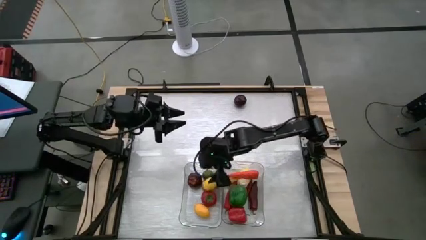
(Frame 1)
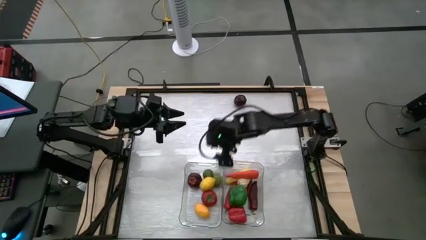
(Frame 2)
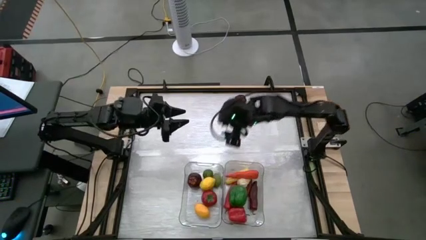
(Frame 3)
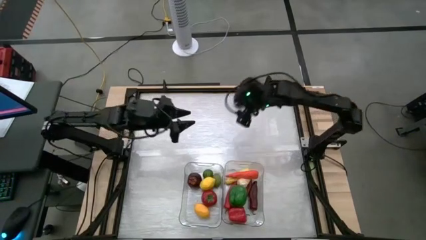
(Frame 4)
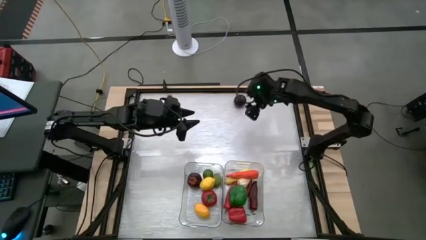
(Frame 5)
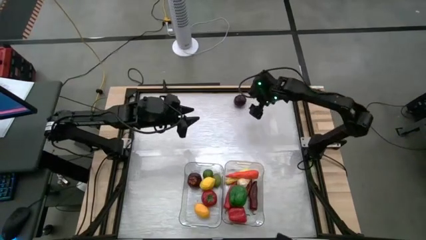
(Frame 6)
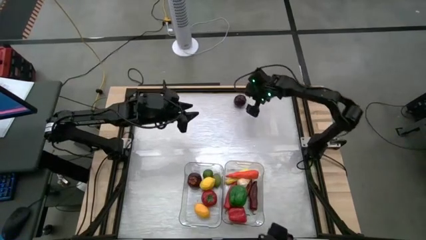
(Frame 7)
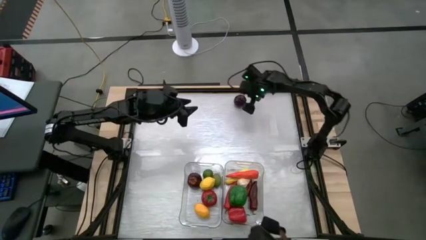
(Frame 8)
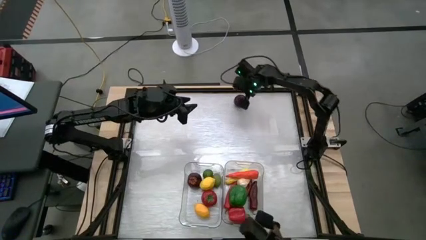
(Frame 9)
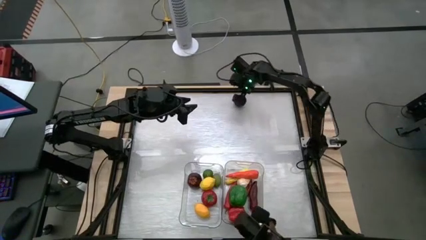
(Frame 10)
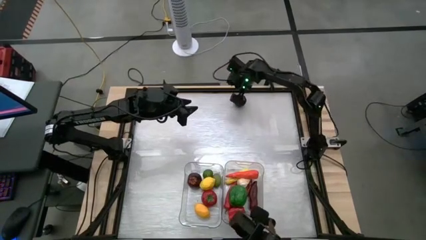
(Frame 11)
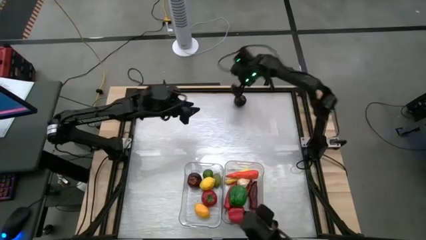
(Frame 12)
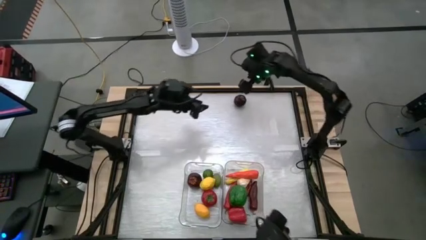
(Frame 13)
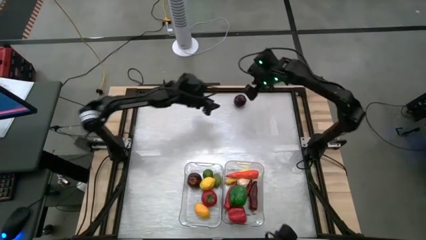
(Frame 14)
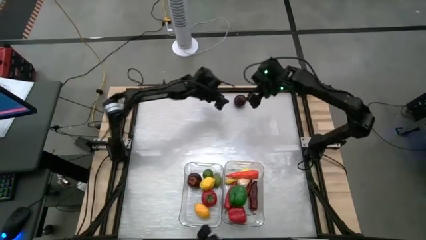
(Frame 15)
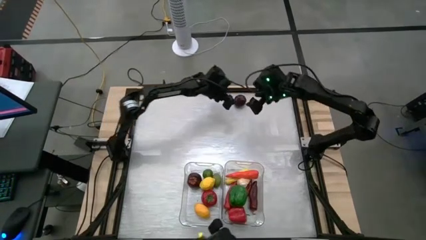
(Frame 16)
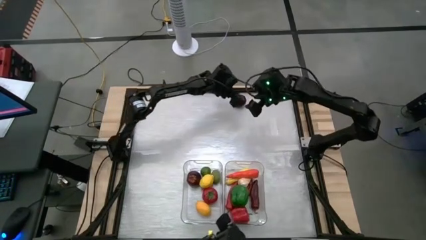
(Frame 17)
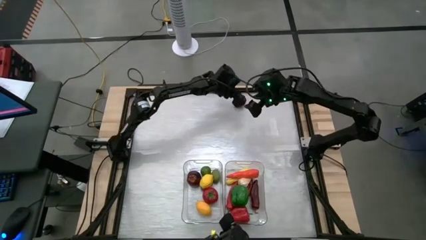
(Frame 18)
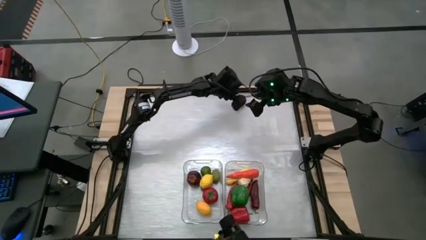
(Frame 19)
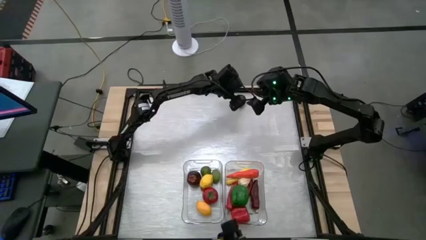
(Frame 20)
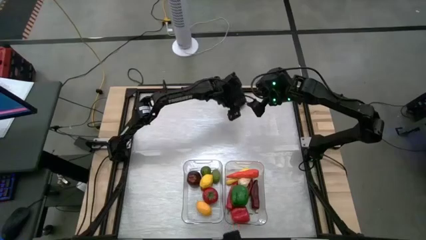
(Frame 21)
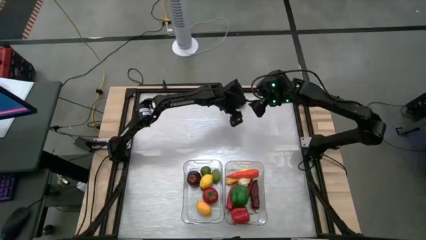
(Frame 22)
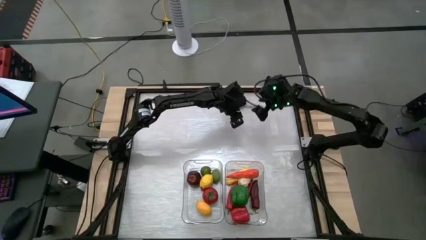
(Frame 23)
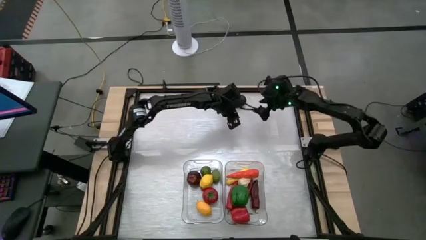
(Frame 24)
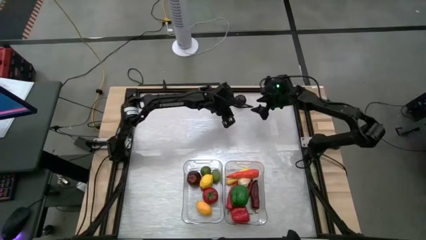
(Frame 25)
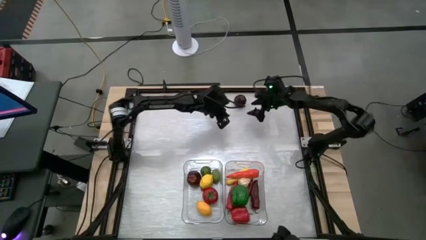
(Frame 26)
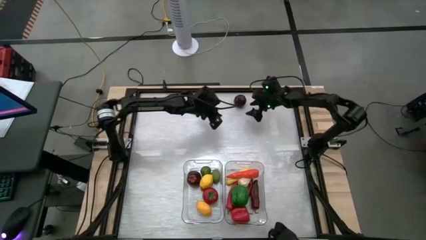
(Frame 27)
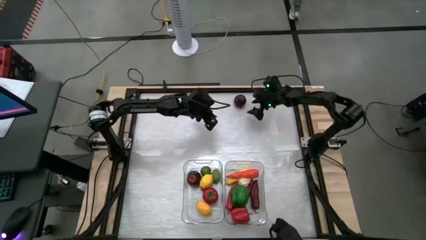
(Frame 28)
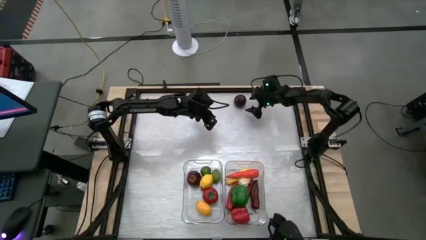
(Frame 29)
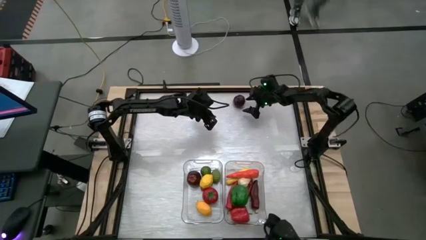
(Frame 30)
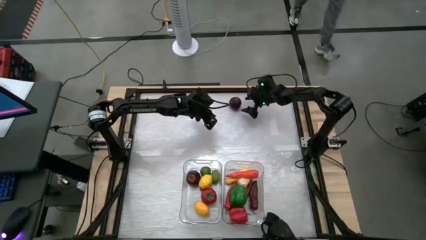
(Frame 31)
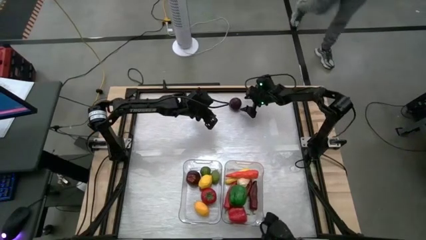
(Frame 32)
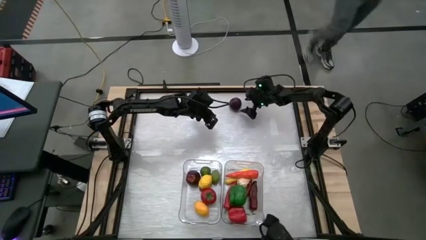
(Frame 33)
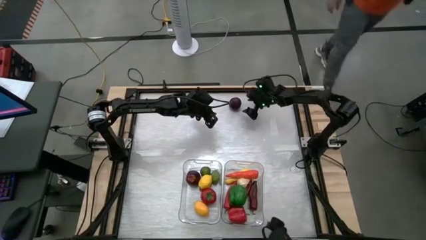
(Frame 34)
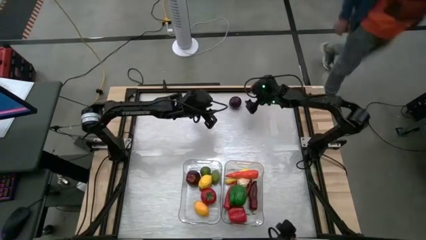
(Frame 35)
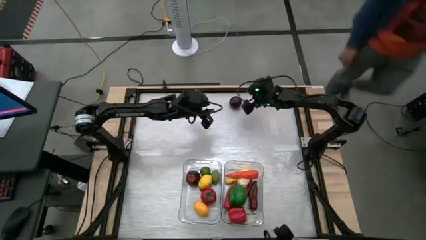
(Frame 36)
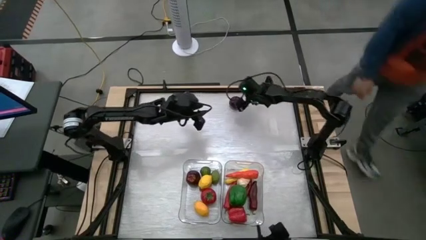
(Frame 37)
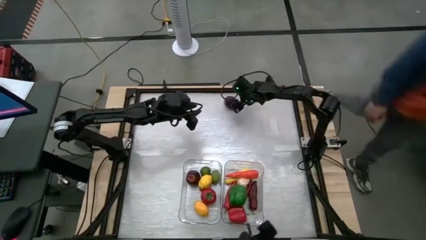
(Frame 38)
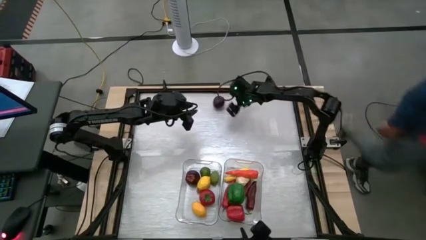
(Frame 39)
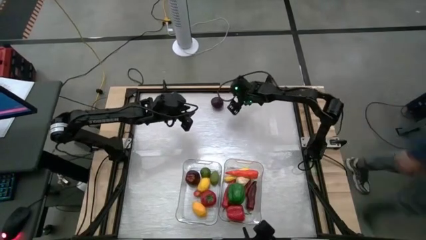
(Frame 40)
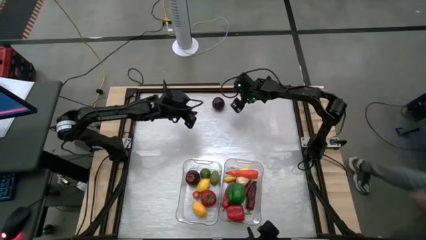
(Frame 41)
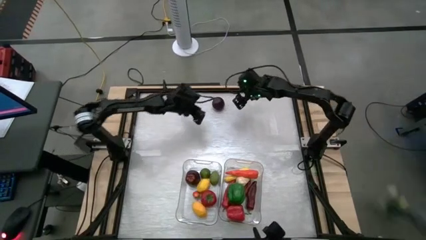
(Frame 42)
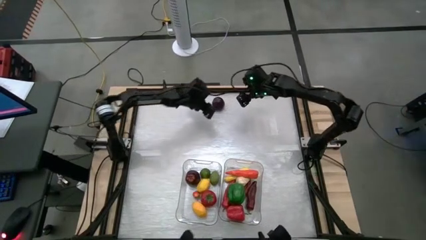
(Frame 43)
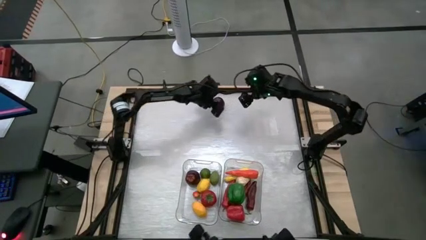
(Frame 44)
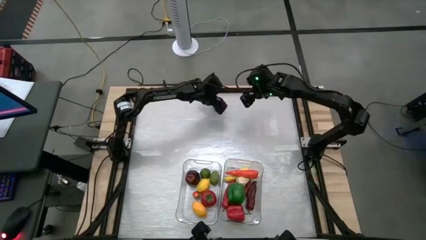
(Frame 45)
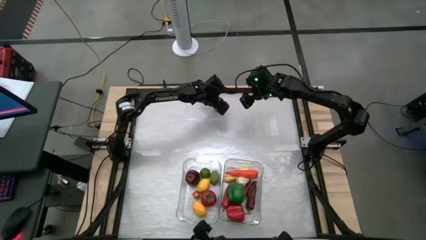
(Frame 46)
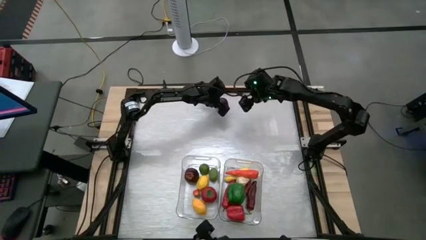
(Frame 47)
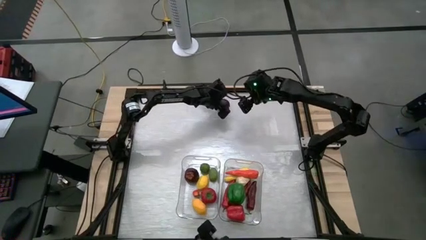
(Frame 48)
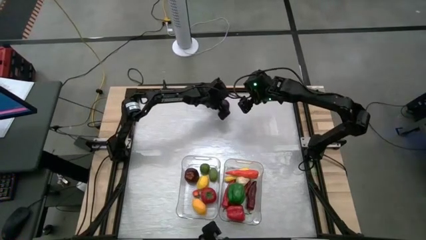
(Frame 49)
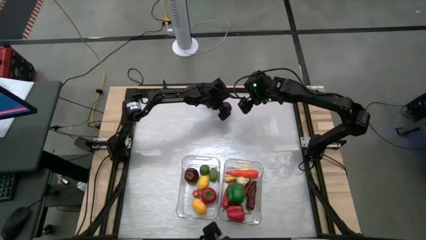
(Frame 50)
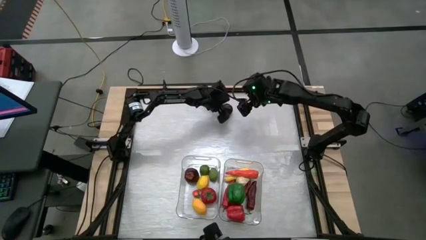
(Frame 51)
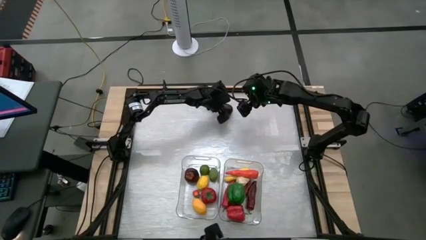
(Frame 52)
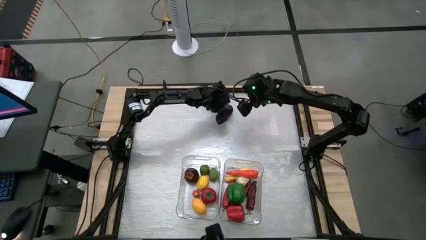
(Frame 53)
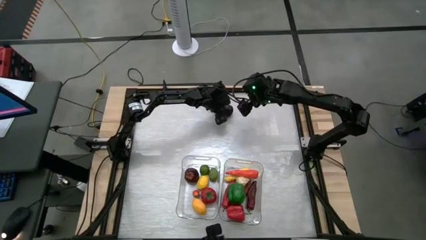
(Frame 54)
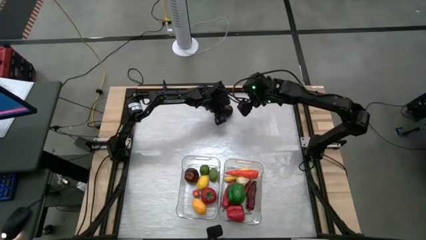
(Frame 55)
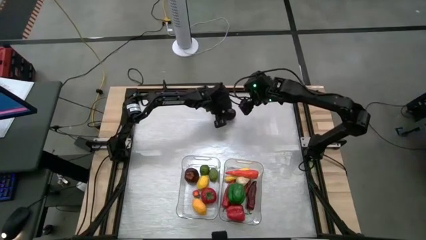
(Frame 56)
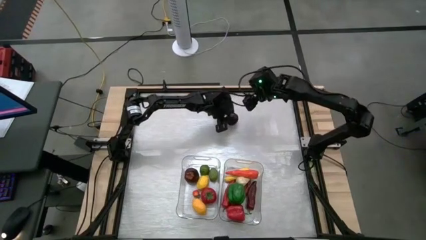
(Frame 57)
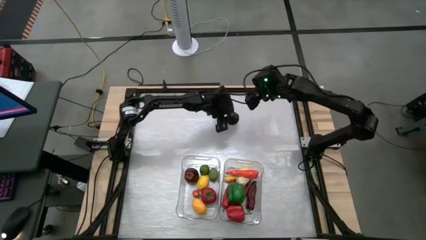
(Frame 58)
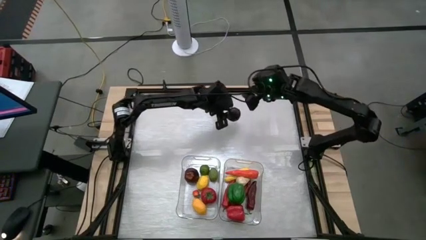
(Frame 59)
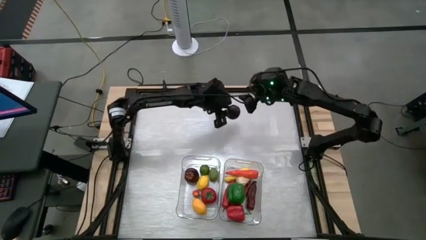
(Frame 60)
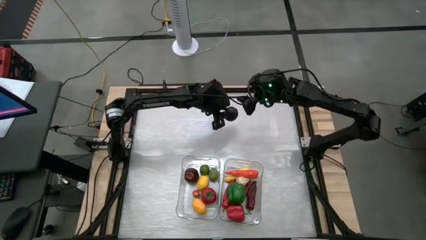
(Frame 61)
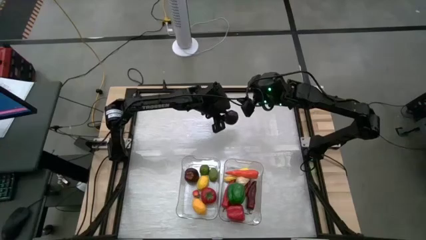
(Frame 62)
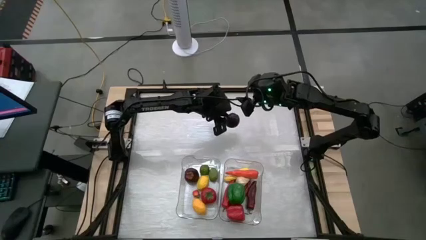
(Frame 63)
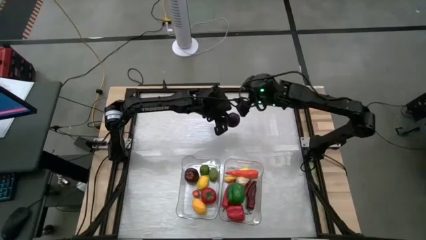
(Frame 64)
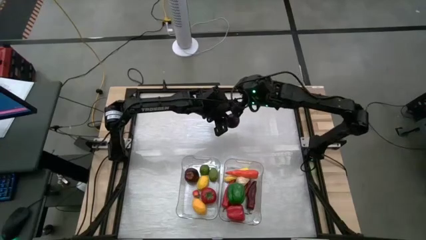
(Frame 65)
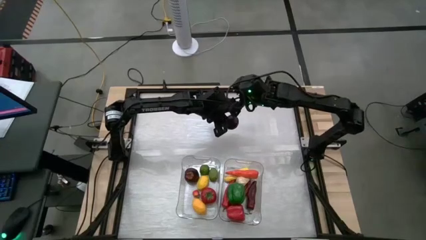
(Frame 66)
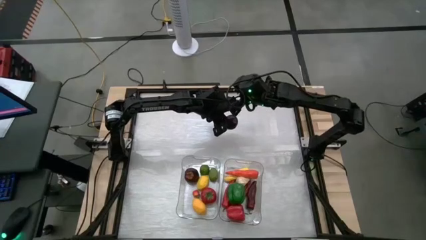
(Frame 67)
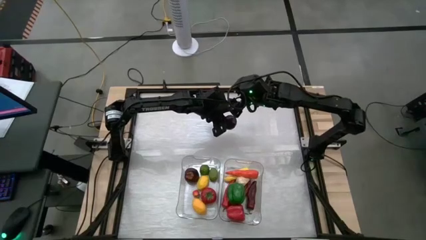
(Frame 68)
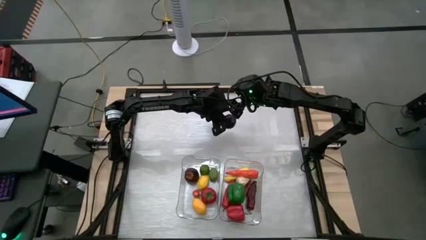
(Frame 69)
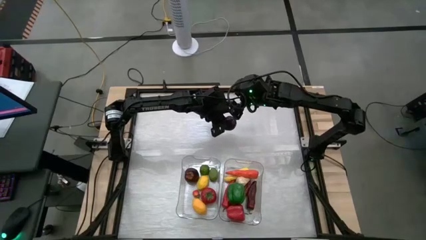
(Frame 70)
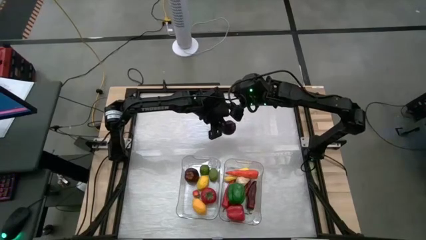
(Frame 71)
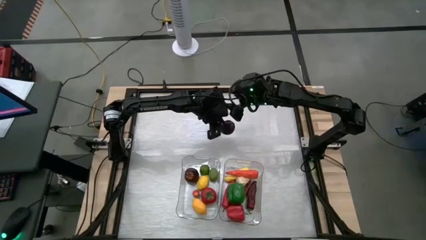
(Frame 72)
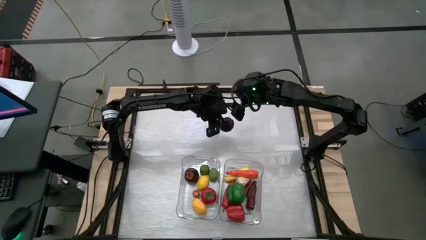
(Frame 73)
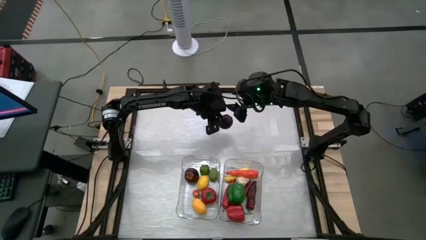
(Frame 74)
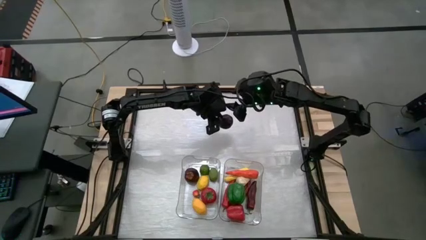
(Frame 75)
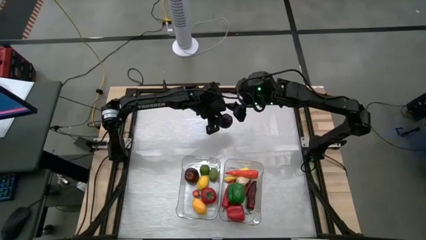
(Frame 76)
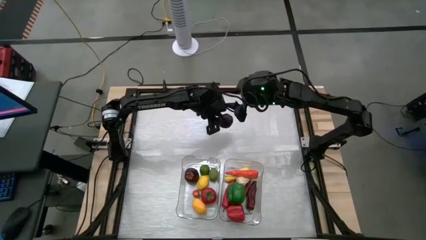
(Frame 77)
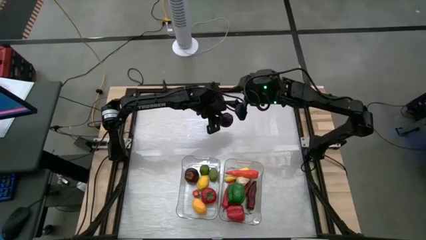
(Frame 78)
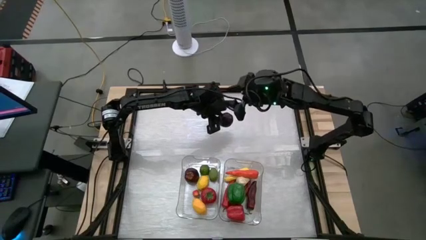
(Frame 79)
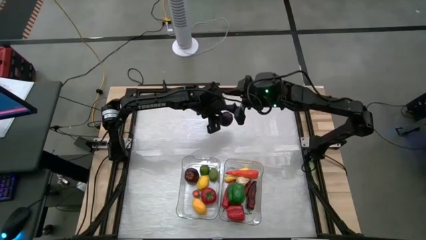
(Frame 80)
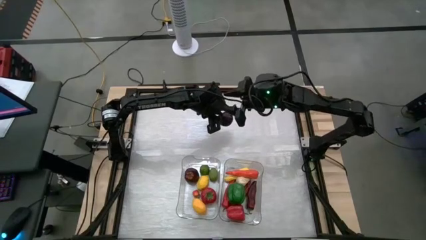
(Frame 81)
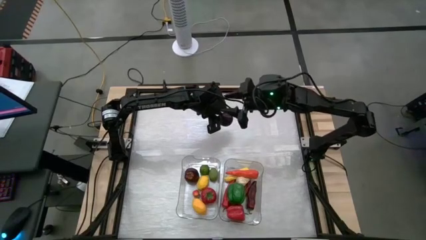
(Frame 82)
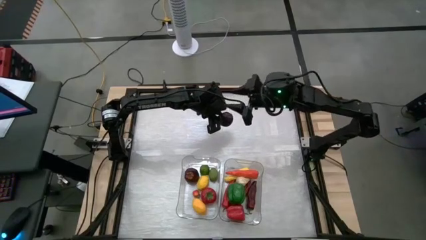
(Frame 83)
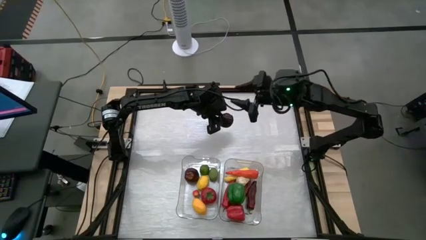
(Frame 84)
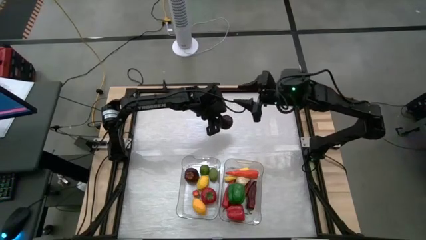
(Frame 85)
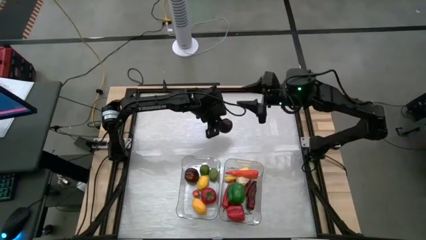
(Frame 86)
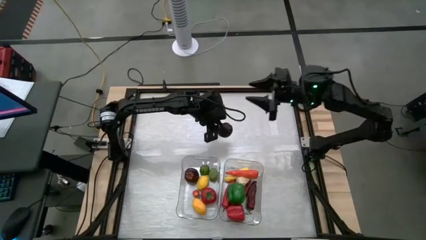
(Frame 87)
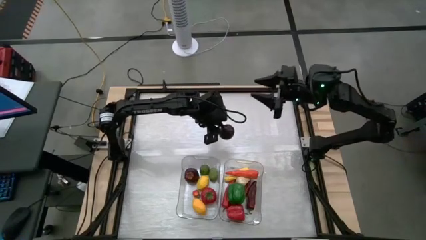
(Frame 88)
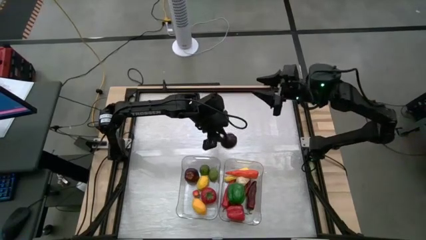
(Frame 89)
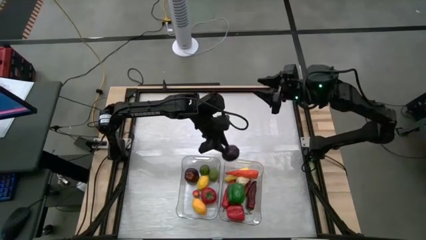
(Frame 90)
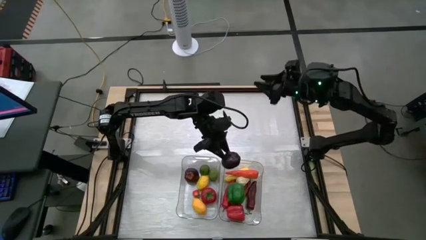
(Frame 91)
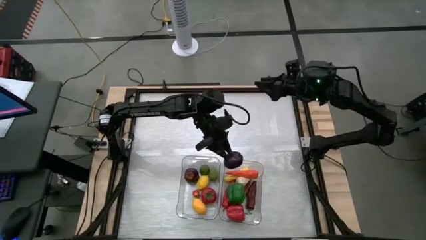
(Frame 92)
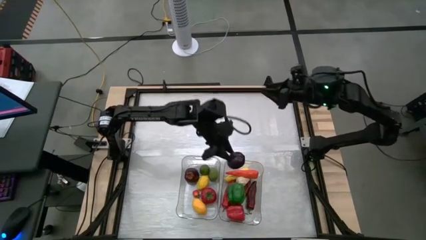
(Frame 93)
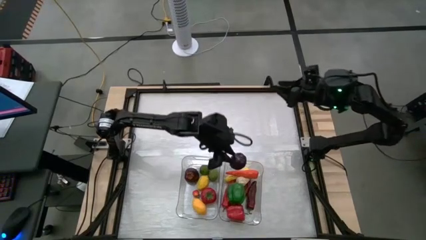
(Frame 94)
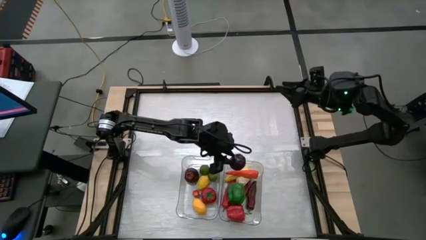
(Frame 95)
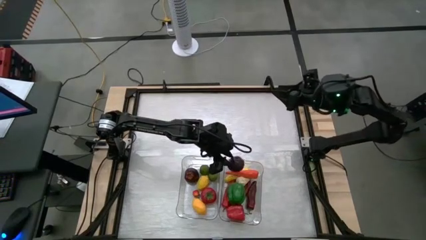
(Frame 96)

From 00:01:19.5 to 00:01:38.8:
Task: Sort produce into baskets
Put the plum into the right transparent bin
